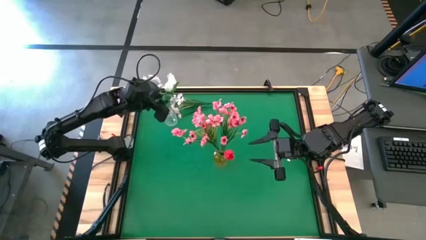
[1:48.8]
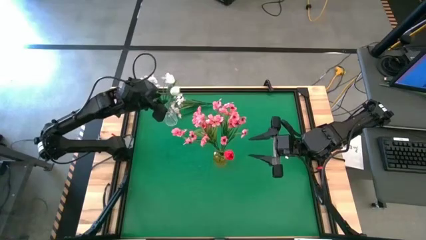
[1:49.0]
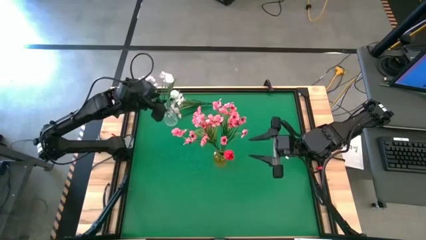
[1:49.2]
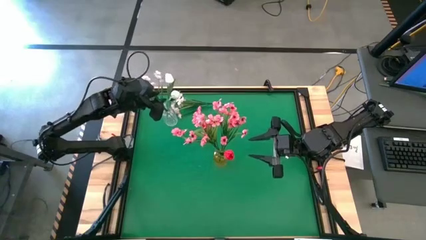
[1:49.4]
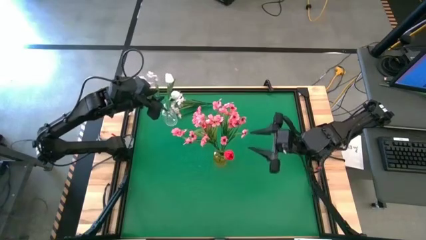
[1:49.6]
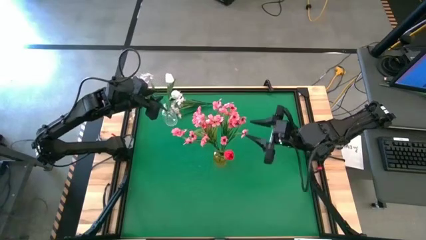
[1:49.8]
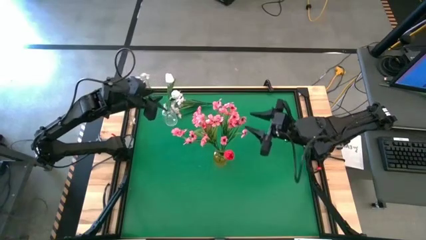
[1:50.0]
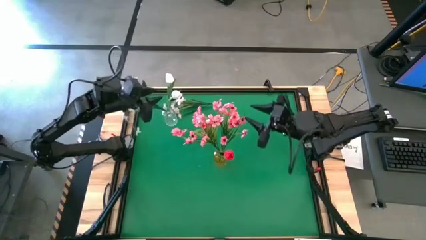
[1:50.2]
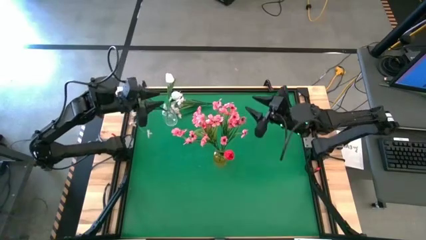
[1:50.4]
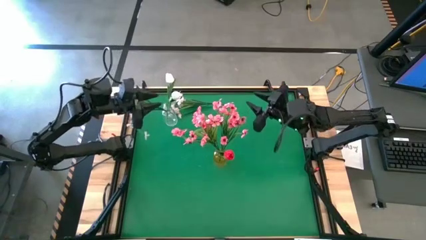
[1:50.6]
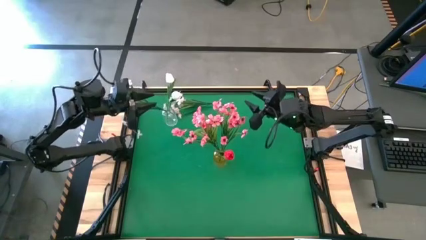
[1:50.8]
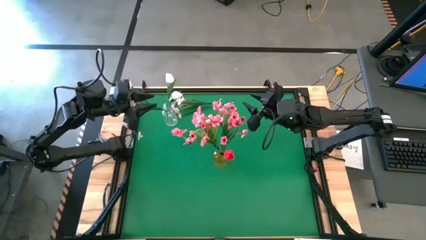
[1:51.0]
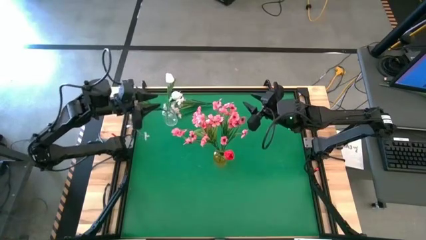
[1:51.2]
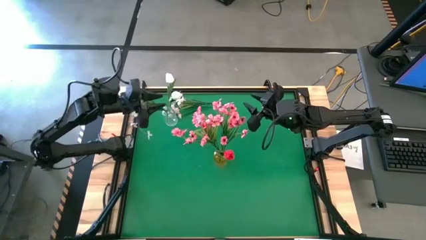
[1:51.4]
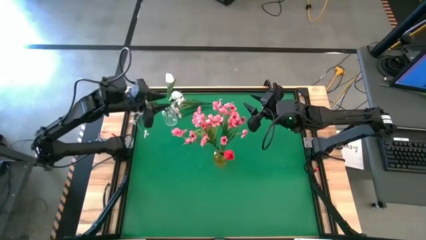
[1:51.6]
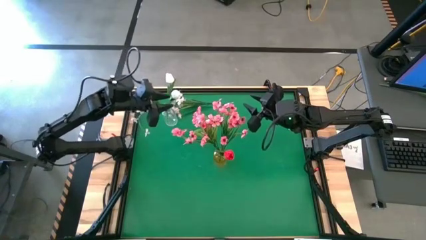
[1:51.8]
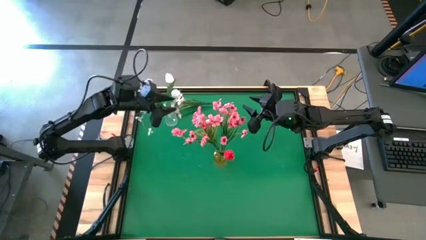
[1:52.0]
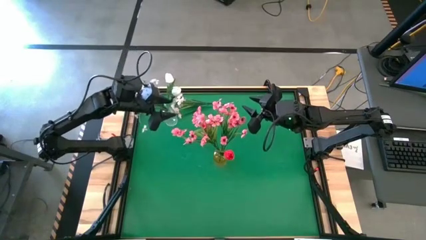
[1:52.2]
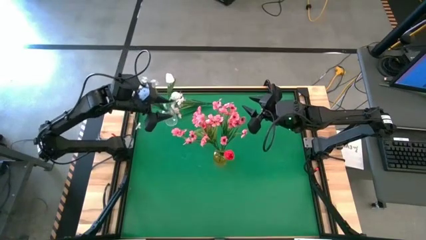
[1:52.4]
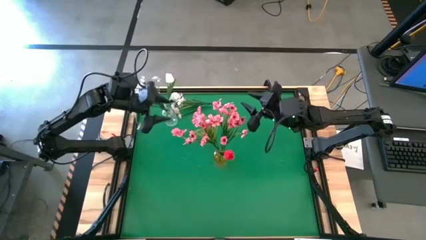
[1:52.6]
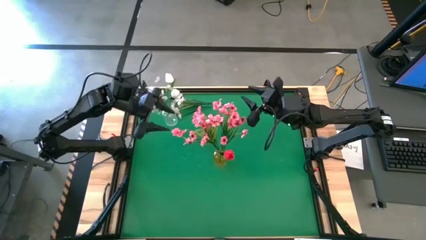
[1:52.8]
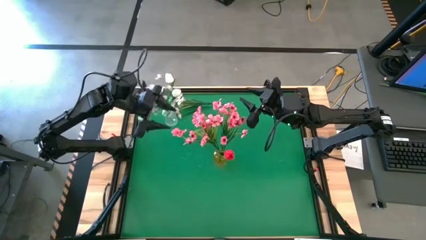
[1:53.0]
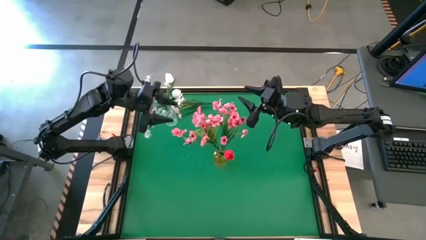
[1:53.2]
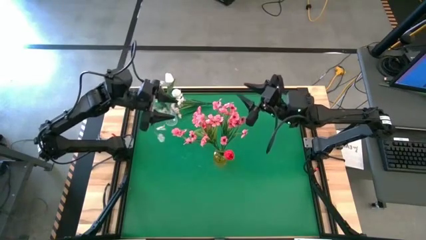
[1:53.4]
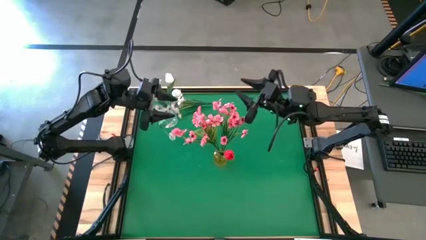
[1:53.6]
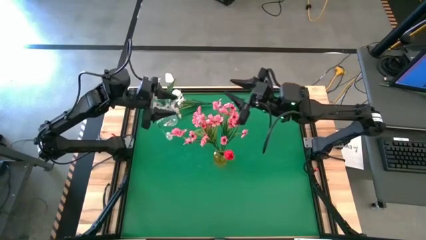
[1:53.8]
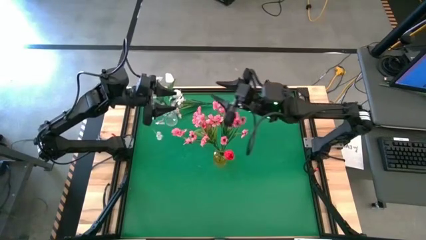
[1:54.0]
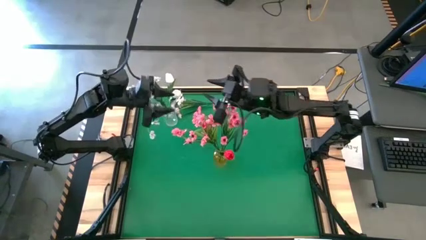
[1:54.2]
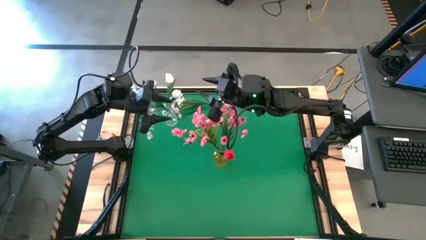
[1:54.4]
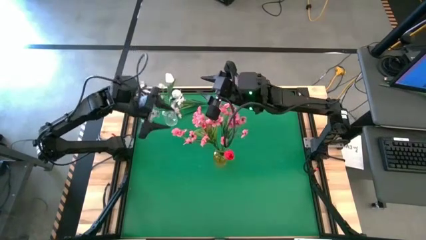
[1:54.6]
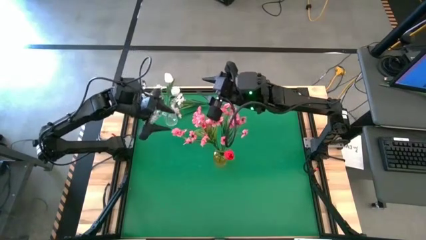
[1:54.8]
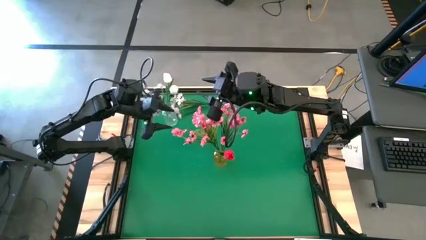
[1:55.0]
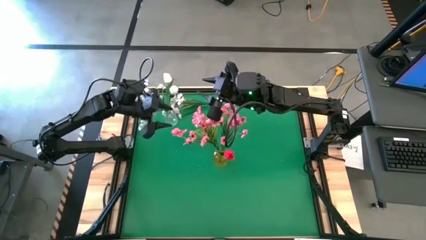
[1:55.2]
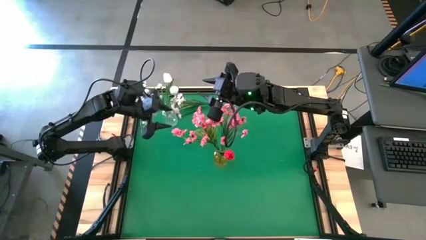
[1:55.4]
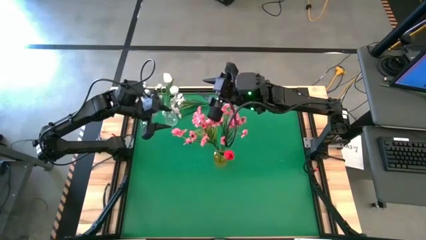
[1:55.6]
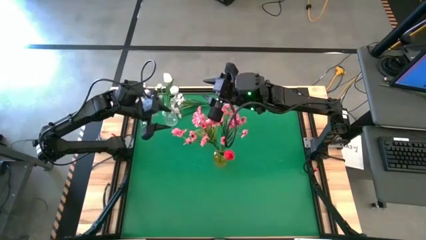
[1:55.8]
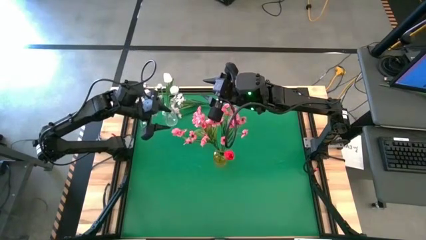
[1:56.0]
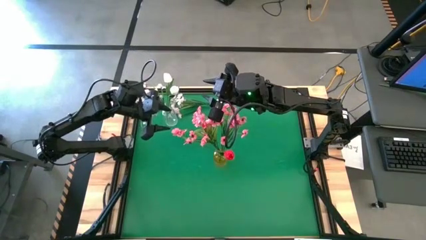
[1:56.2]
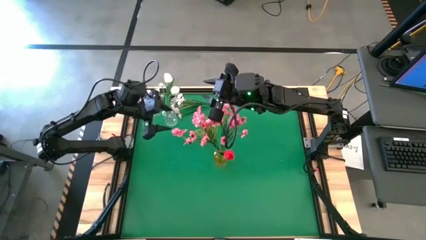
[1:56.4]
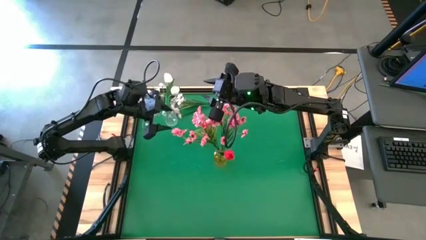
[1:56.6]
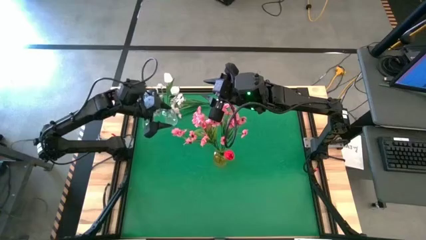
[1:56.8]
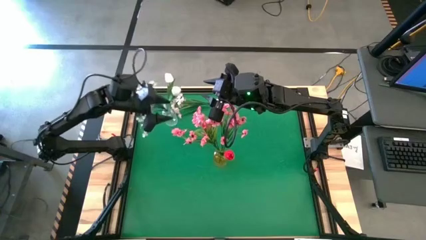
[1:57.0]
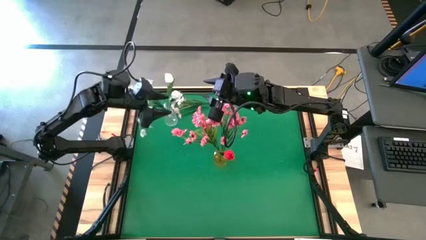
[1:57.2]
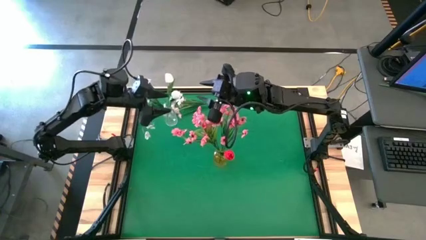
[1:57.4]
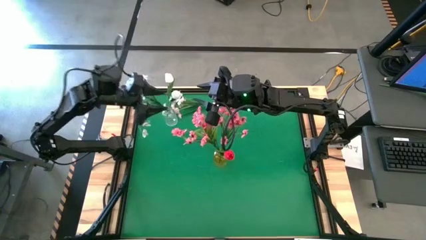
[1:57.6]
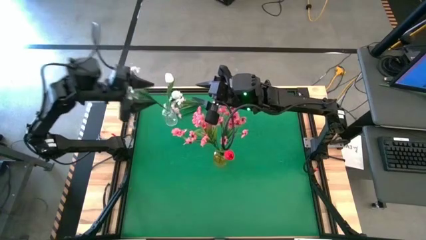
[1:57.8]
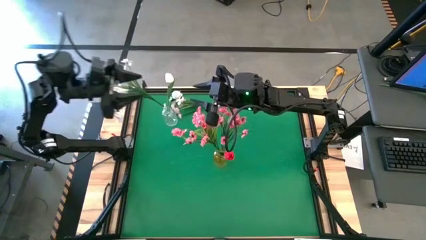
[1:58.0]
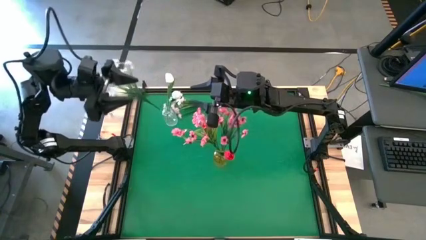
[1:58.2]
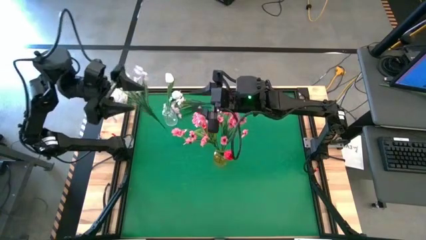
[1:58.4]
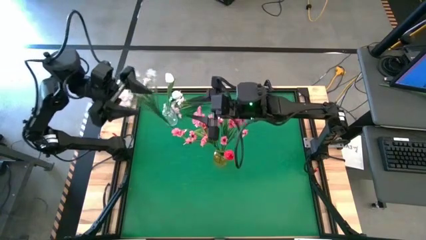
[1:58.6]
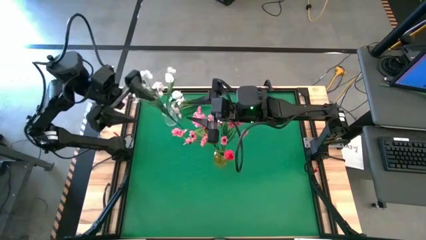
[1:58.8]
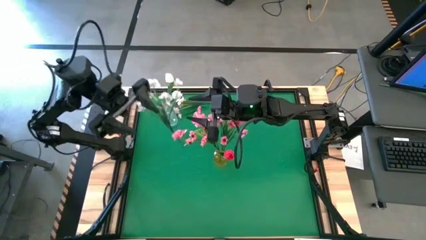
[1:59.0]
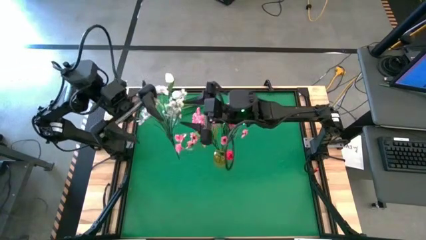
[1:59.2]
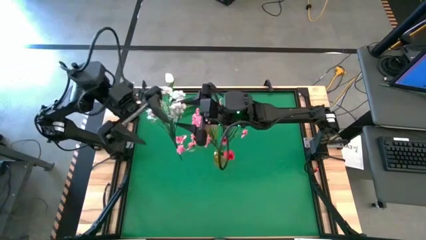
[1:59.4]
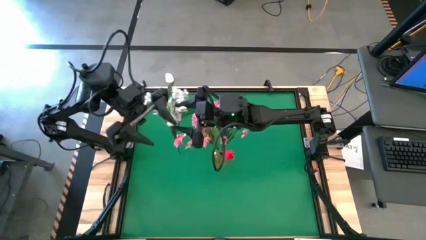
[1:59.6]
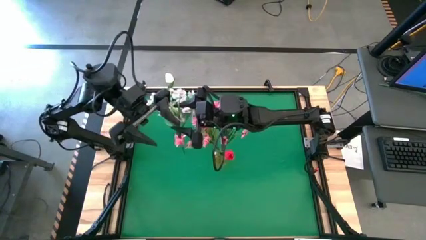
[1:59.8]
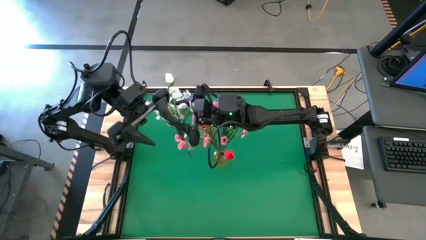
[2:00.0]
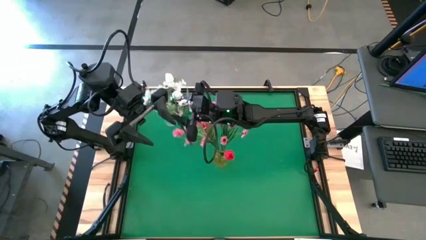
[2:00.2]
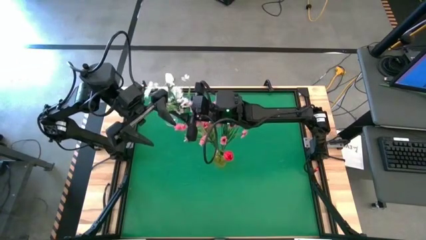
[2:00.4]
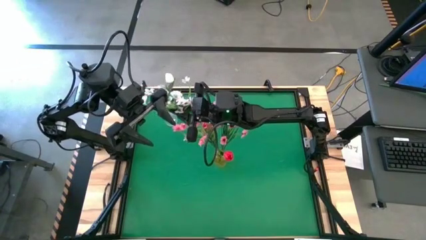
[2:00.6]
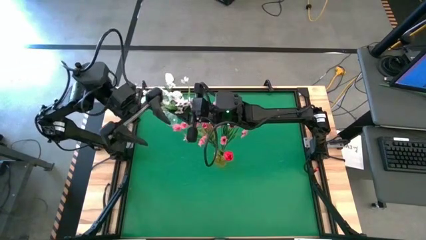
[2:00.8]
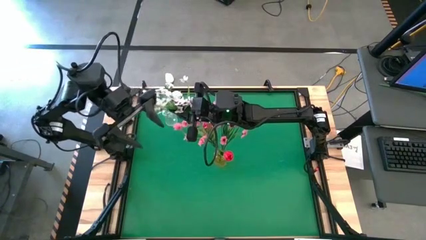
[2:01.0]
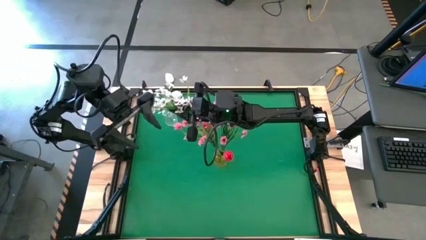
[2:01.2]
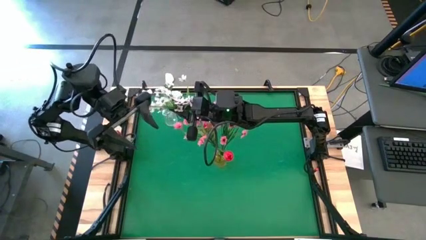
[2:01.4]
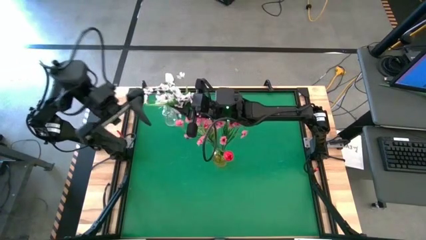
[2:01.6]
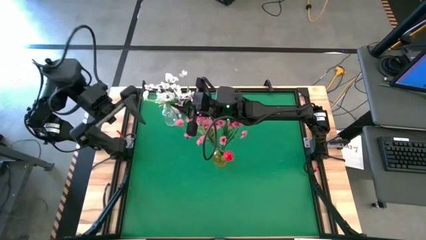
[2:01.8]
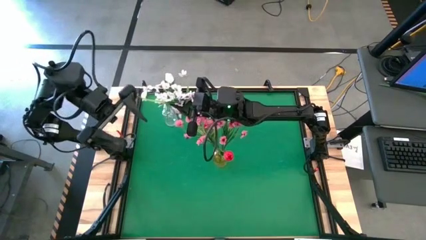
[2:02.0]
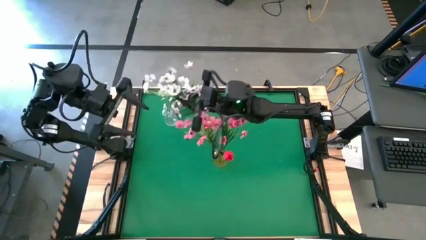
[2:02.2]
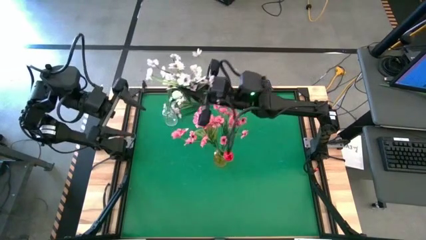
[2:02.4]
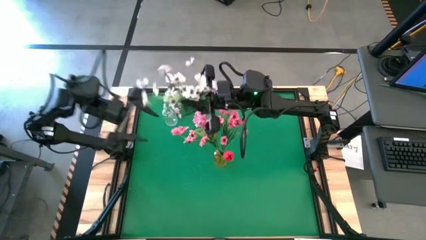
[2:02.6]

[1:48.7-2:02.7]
Task: Sort flowers into vase by color
Adjust the white flowers in the transparent vase

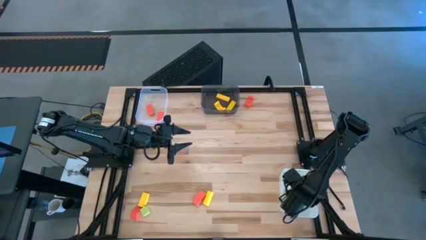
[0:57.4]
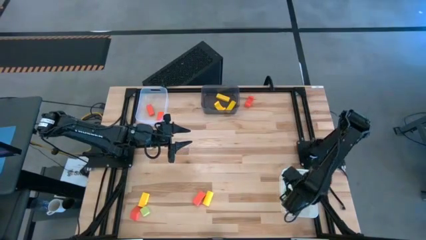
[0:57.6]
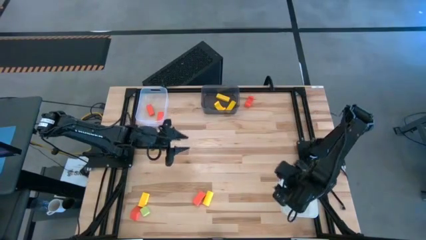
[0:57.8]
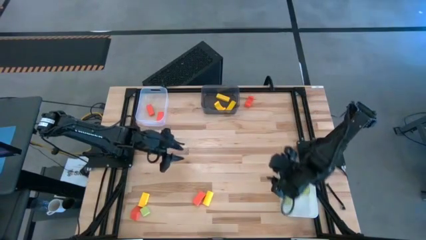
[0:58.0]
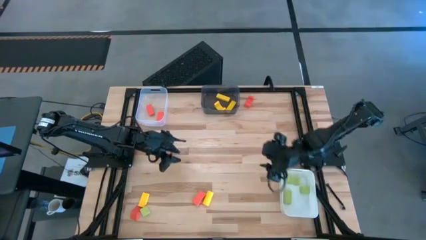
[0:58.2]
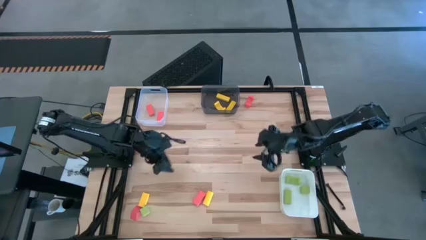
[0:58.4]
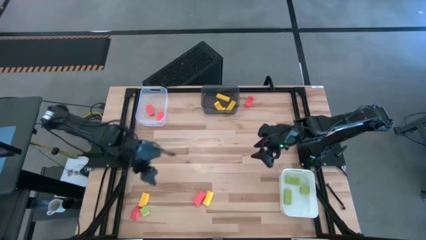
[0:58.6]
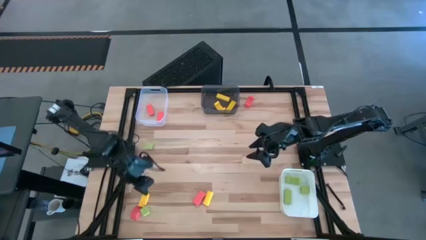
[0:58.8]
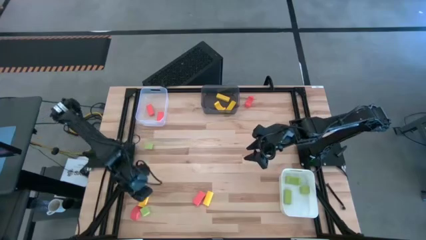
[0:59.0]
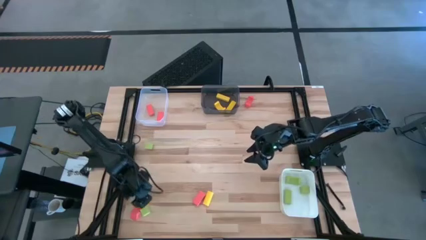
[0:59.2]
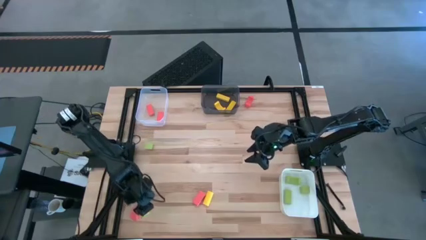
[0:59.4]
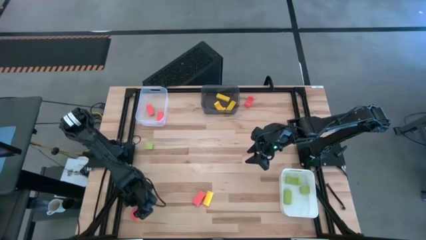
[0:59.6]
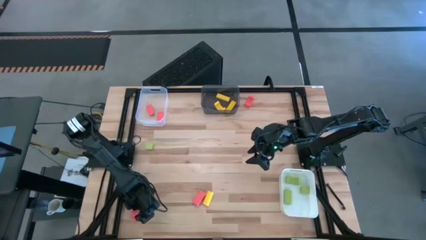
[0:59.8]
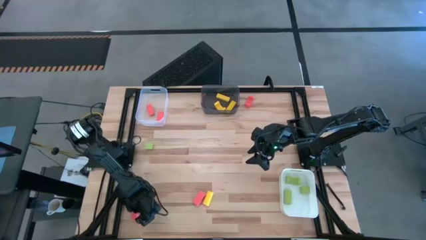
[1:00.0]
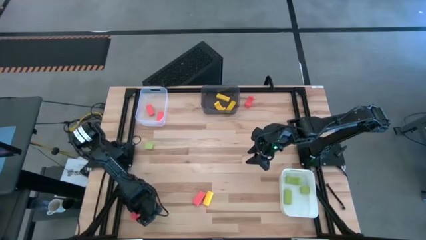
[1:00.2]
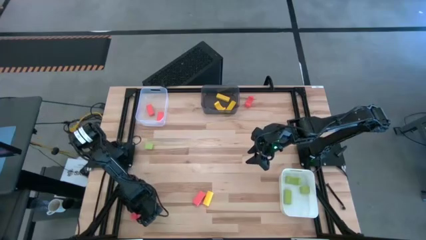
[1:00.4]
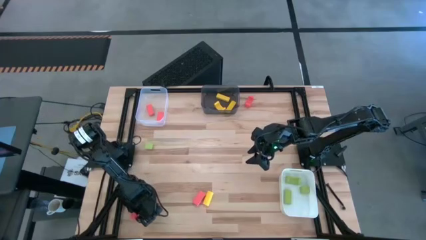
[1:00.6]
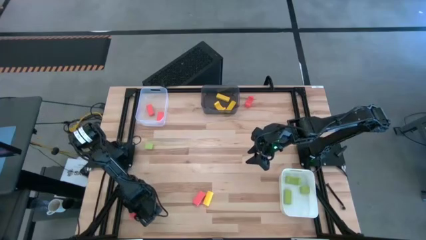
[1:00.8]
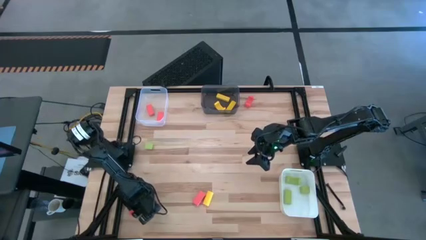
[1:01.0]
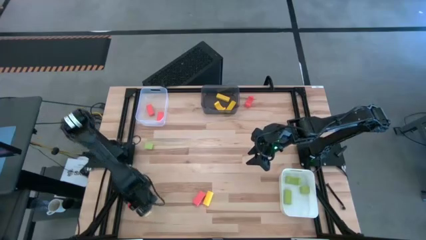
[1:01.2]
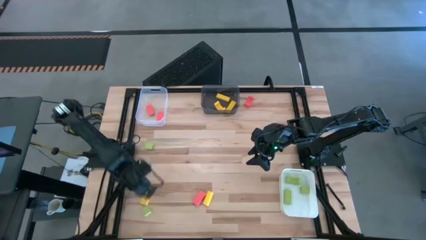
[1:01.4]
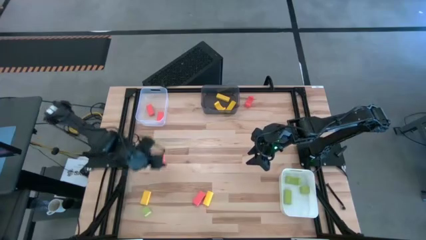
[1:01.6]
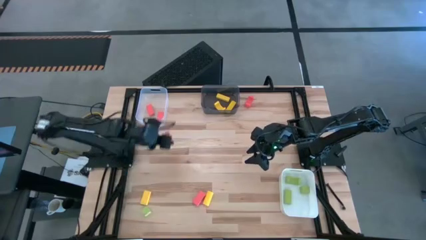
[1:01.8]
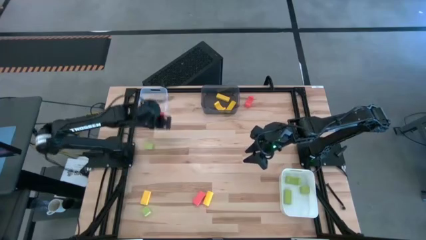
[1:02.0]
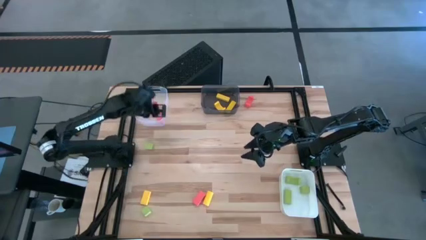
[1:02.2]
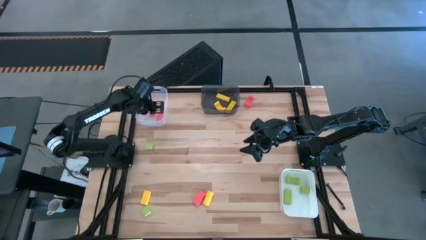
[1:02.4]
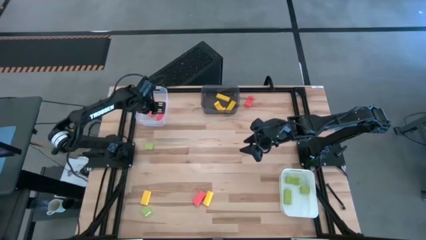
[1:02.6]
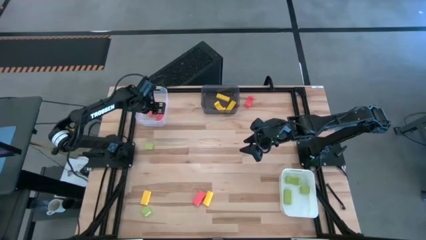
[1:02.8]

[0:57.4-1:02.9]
Task: Sort & place blocks by color
Put the pink block into the transparent bin
